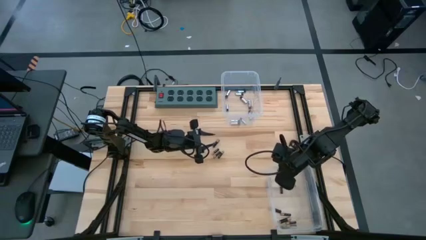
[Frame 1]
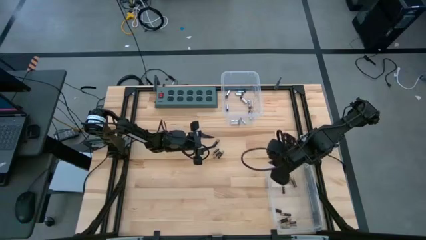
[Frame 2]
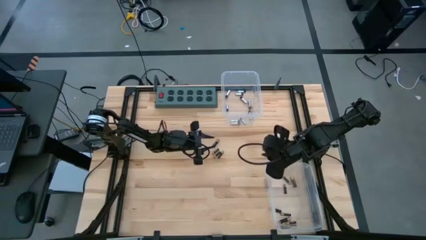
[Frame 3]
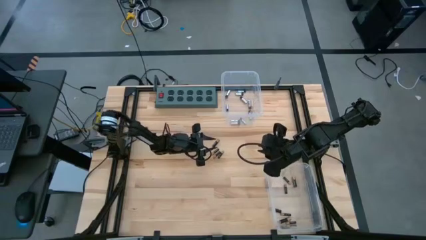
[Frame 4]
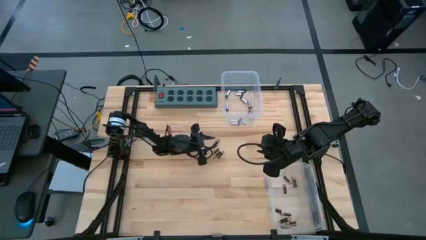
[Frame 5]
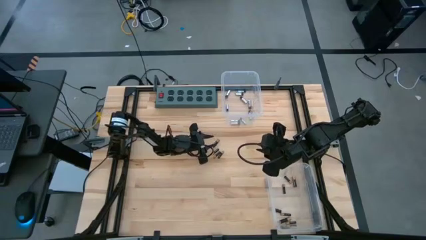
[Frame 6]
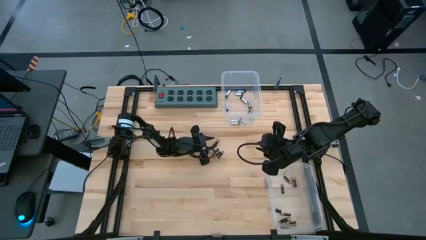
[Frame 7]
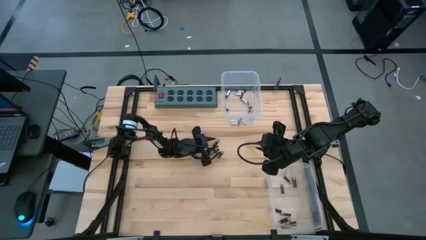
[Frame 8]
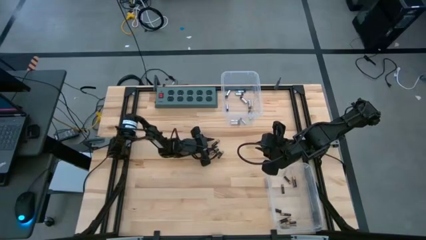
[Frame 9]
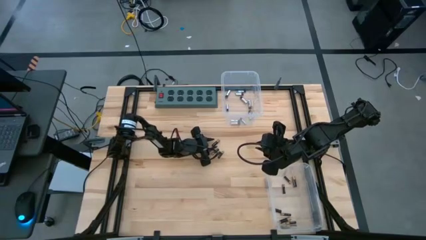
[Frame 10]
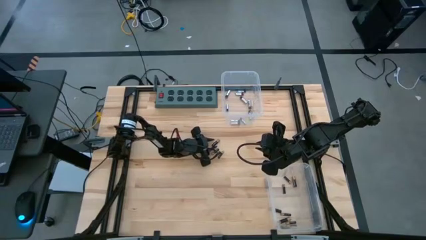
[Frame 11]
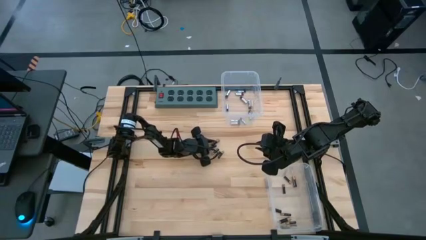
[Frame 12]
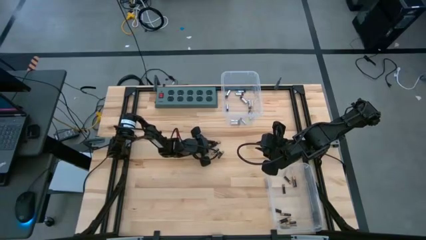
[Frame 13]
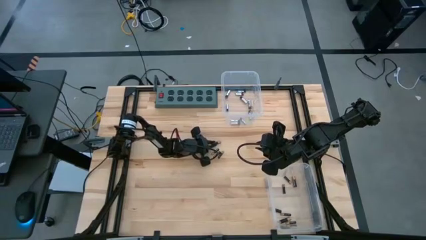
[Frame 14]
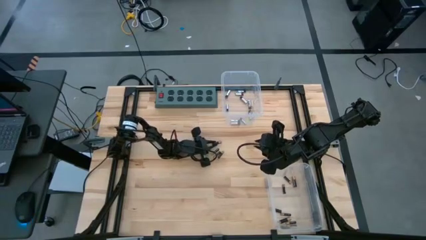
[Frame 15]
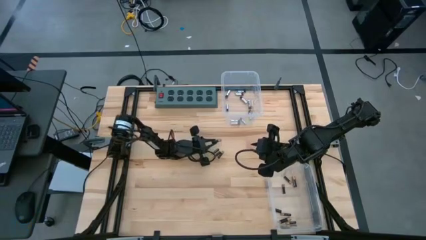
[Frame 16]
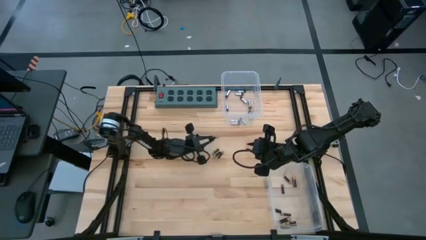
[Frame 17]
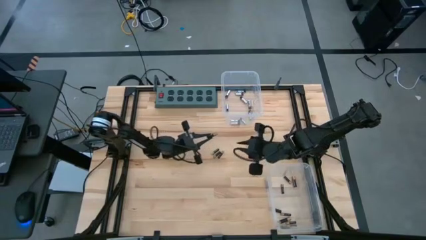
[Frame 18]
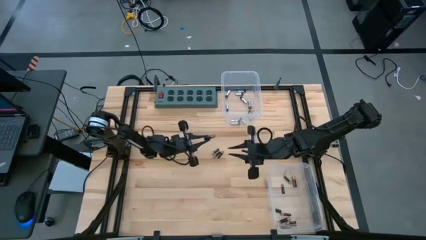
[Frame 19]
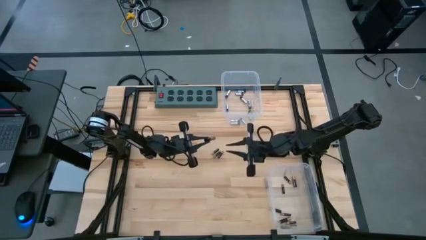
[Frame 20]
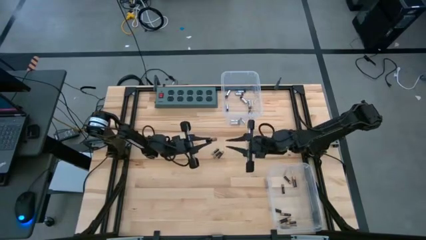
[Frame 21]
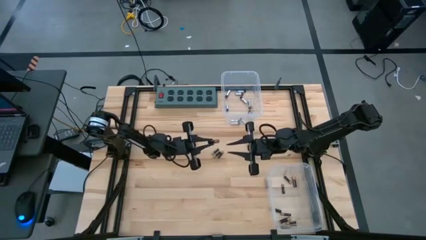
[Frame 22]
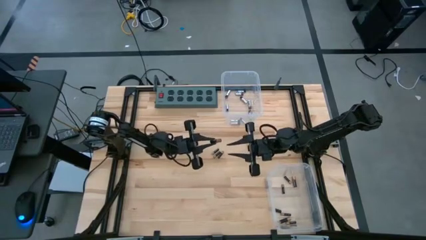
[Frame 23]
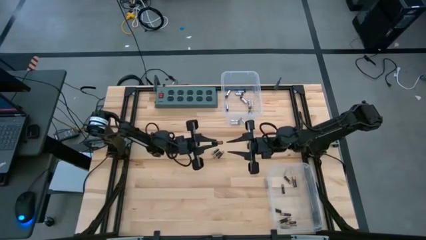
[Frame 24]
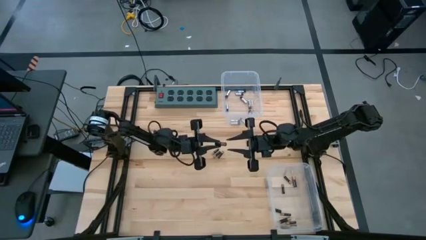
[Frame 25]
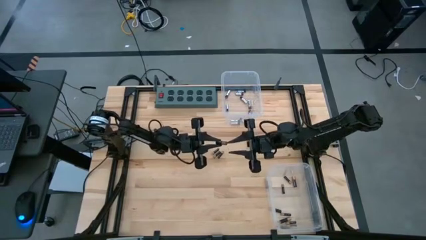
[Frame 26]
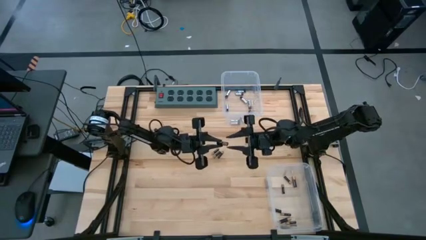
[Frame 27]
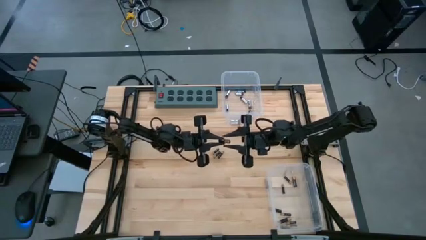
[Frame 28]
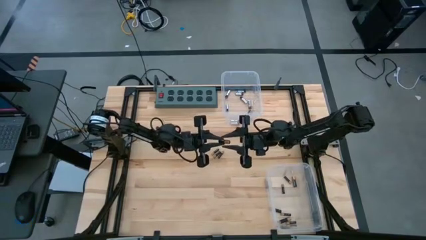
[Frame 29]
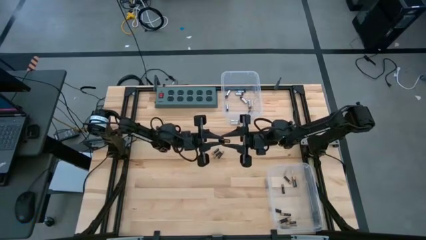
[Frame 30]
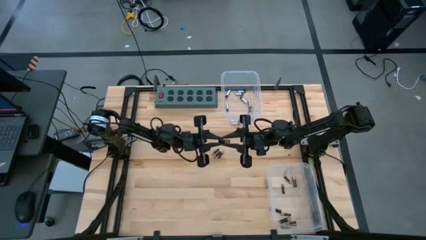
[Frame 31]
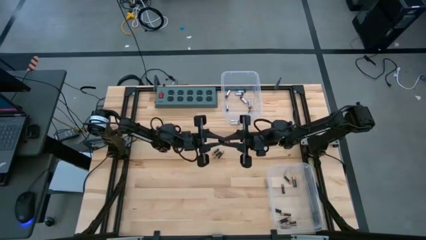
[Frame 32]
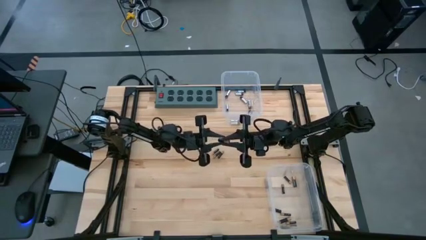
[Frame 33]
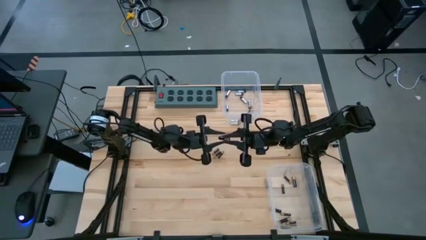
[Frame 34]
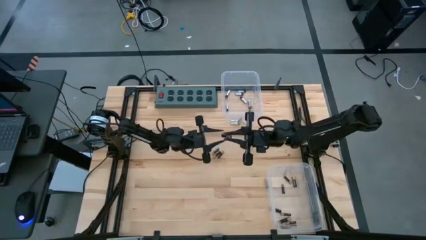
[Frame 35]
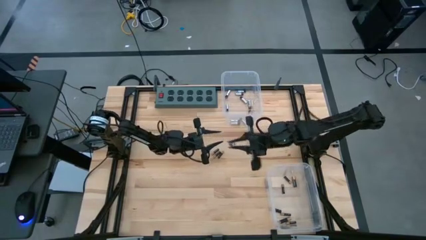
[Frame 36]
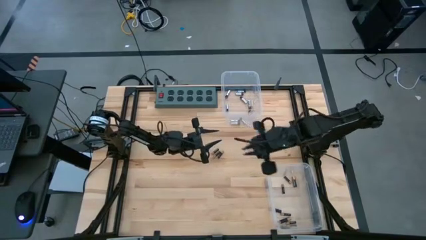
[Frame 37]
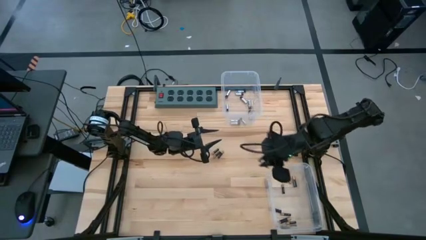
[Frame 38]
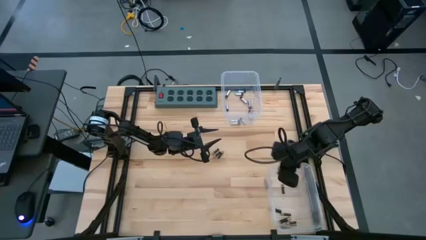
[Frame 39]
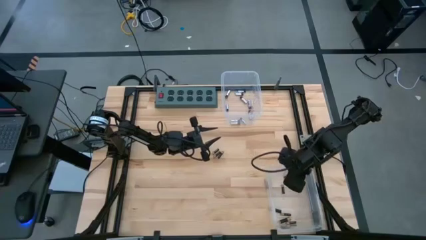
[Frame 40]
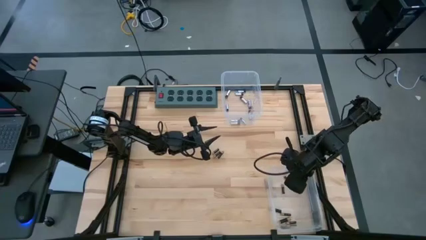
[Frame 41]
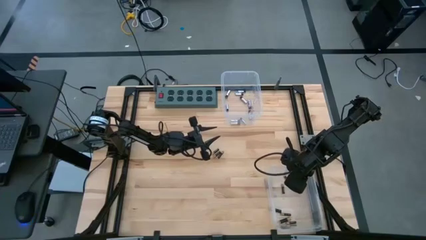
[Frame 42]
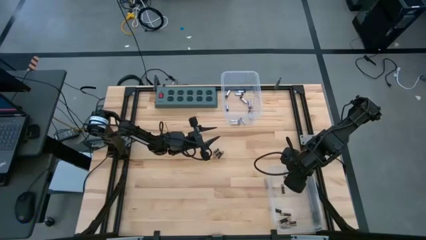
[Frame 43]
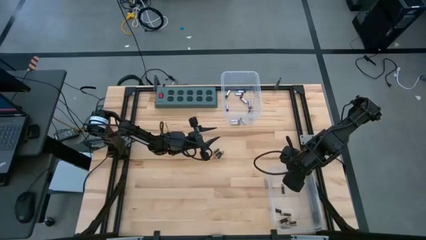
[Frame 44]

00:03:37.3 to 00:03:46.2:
Task: Sort batteries
Put the black battery into the bottom transparent bin

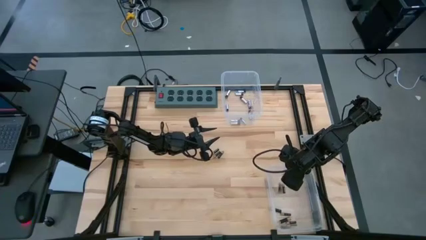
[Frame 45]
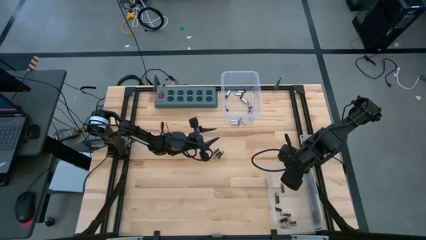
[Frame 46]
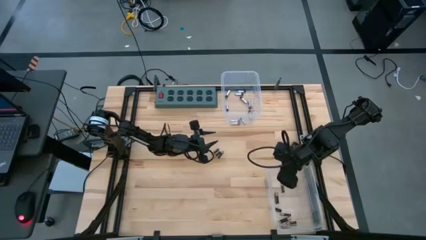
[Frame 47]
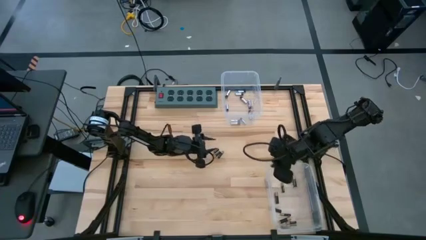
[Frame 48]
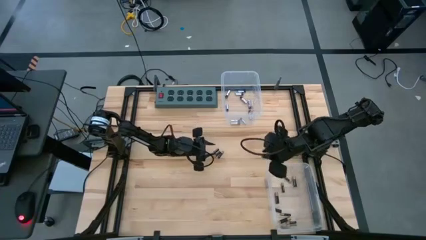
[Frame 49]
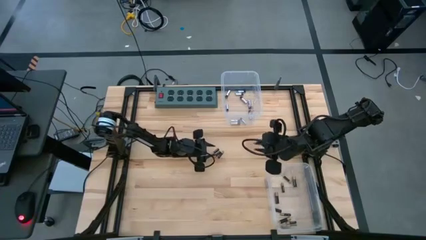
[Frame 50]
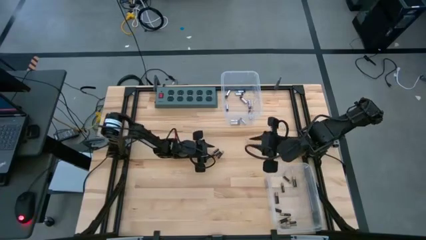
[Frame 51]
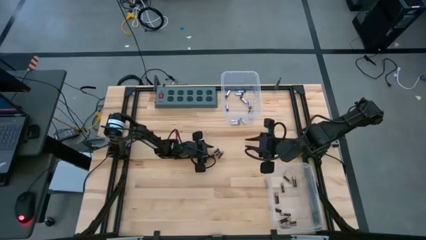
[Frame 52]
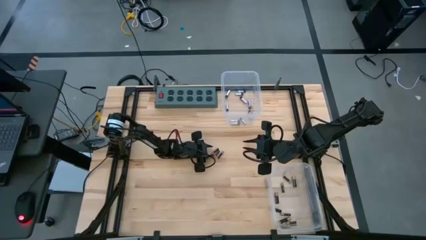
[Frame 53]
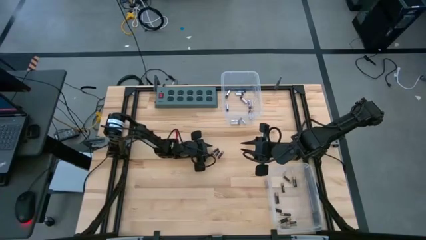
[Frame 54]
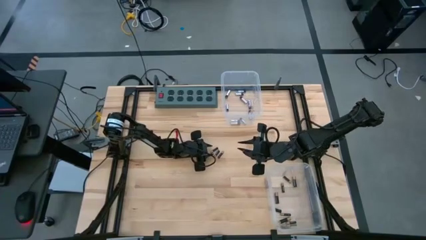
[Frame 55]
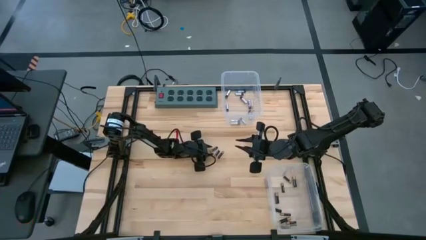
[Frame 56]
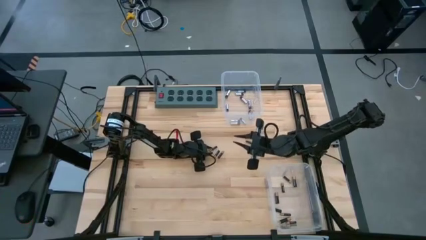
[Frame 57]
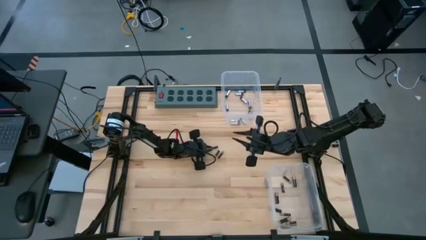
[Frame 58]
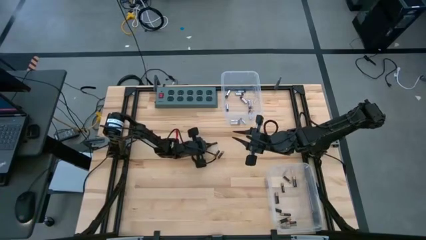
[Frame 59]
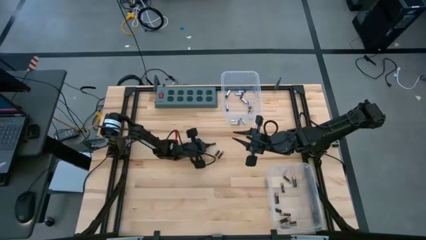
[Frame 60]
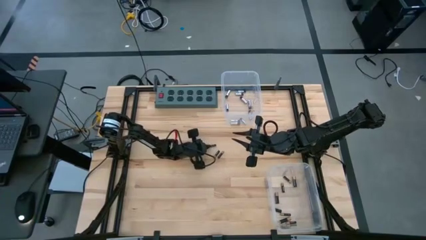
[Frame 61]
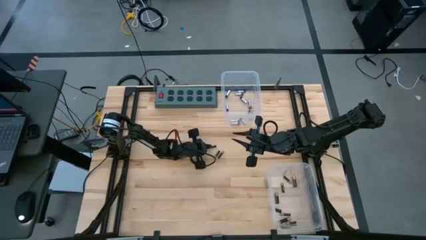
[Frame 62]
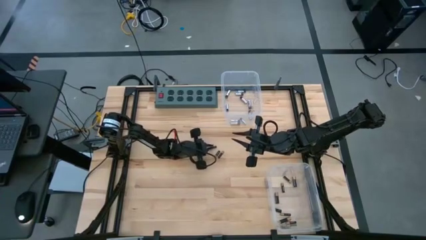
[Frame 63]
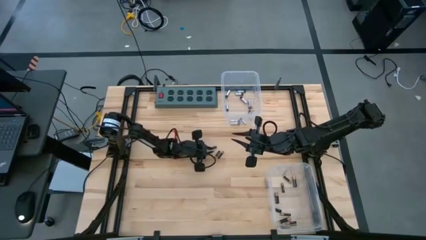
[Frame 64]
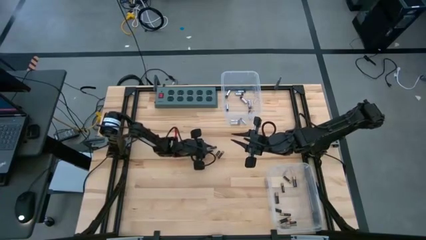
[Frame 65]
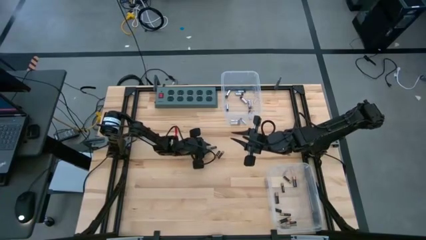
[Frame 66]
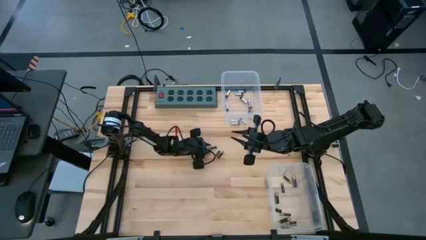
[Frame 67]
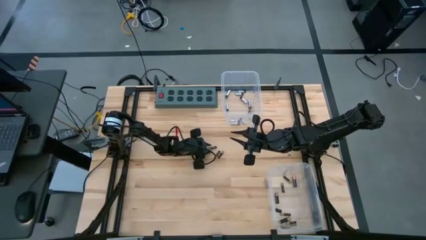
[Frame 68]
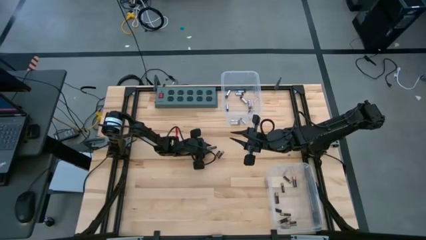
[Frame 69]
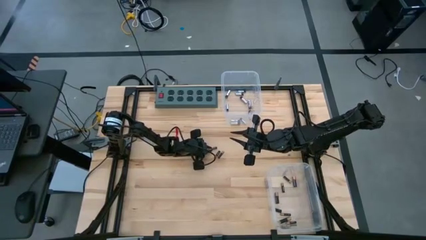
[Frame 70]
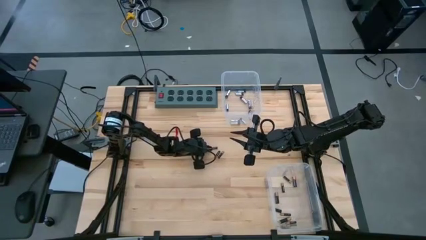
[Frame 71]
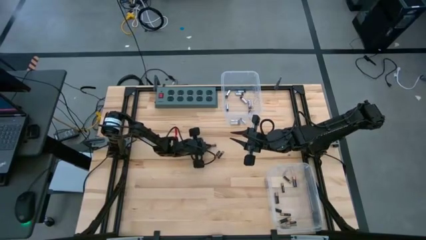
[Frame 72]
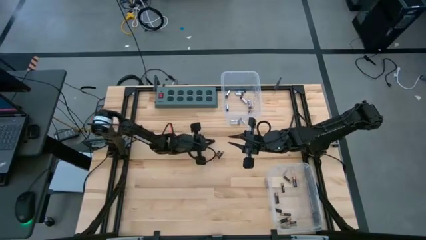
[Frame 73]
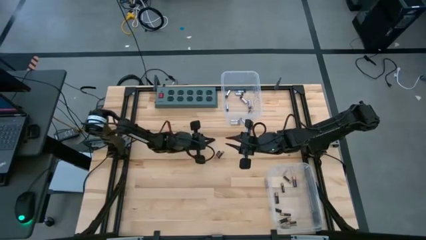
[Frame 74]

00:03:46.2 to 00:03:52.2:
Put the black battery into the bottom transparent bin

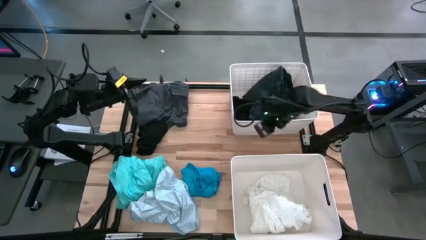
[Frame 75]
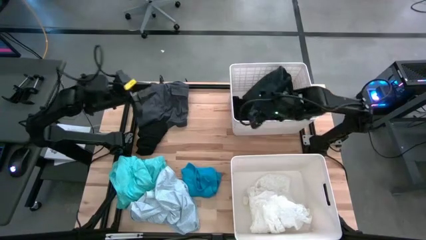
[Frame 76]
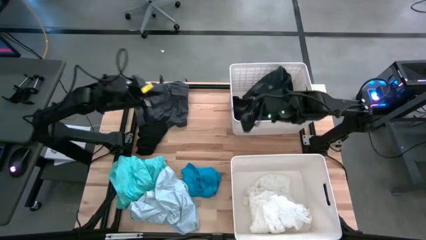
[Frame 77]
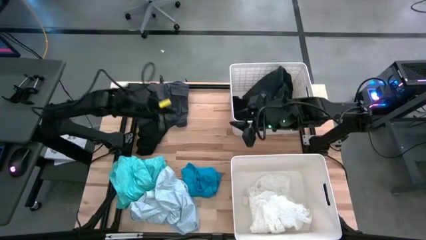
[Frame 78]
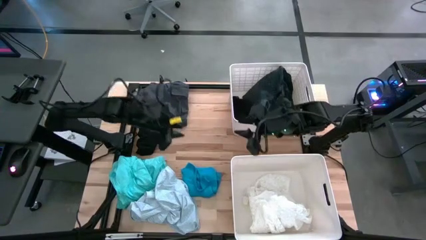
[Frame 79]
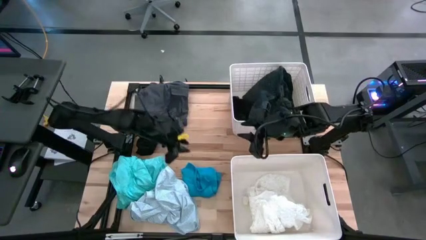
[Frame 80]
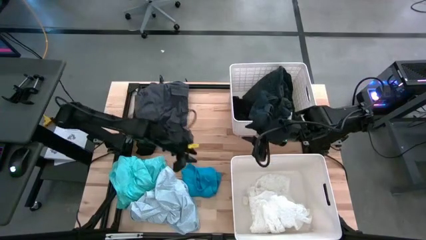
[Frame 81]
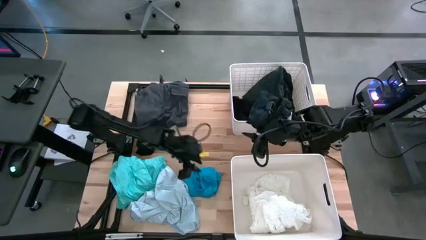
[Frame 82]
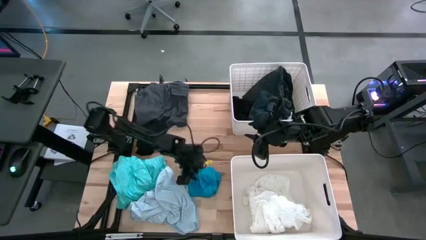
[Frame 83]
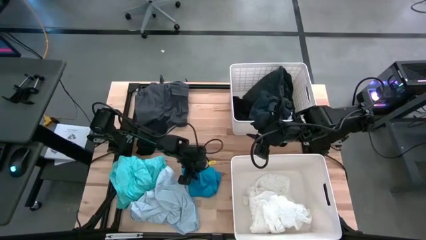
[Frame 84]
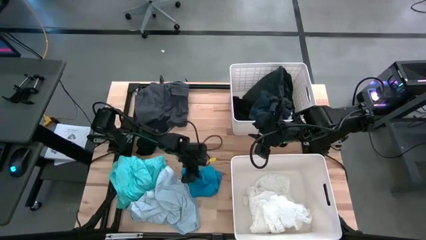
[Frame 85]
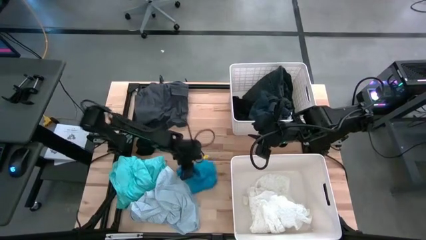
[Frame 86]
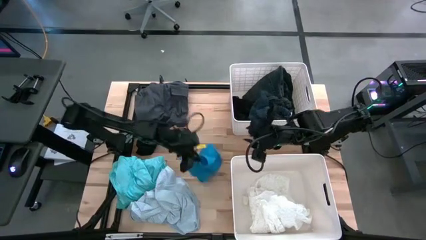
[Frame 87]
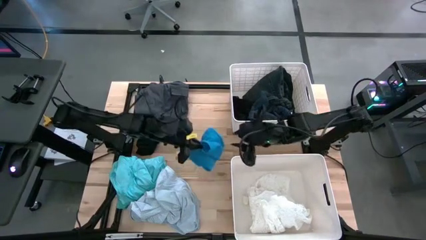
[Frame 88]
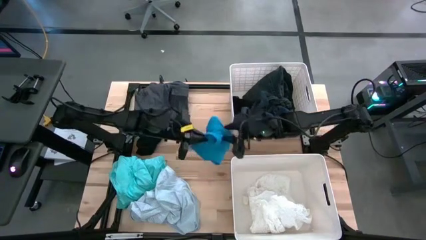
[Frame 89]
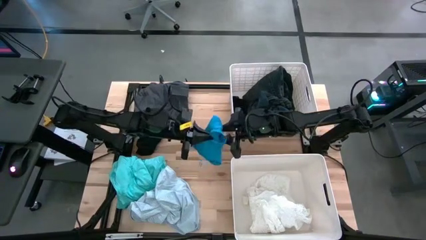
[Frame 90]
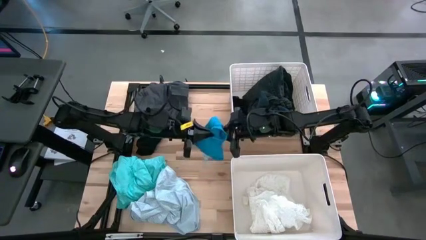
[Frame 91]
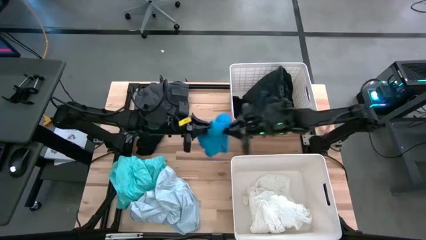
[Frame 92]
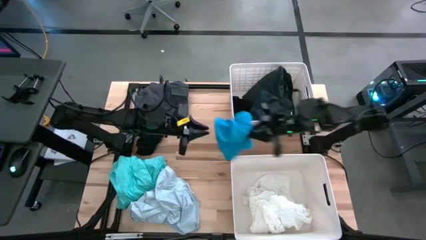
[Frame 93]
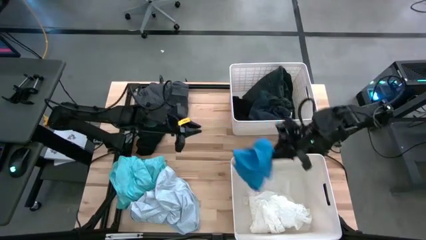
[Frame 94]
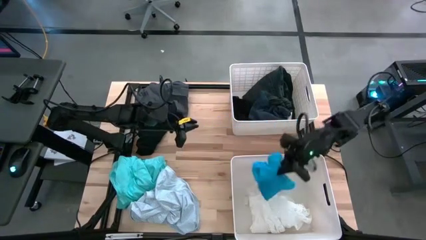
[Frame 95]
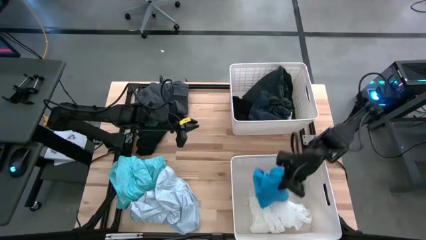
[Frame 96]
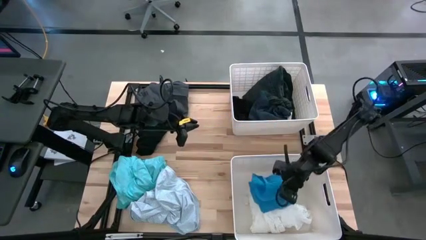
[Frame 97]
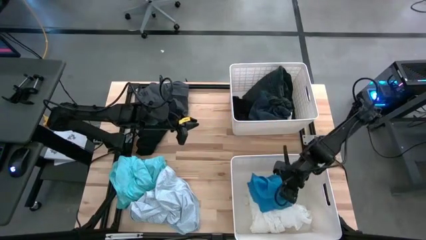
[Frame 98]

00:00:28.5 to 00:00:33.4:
Task: Sort clothes
Put the blue pants into the bottom white laundry bin
